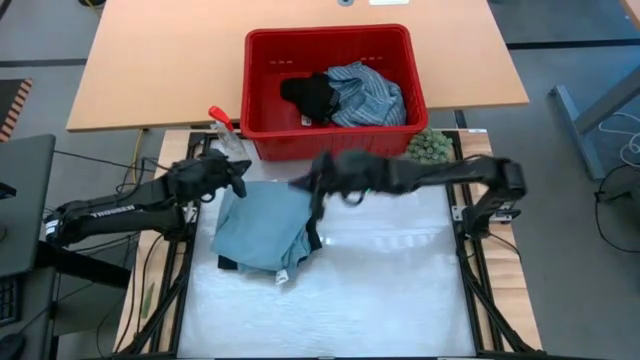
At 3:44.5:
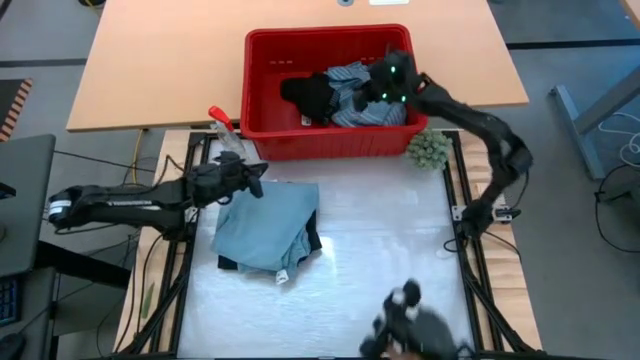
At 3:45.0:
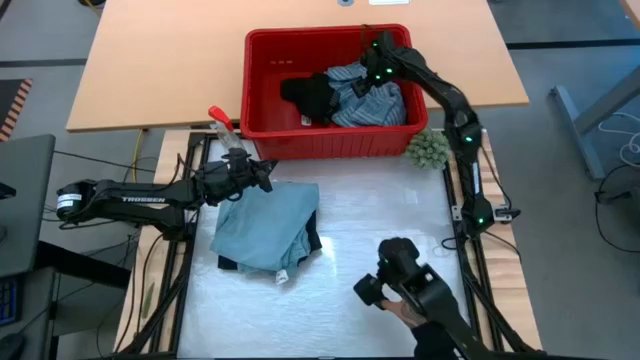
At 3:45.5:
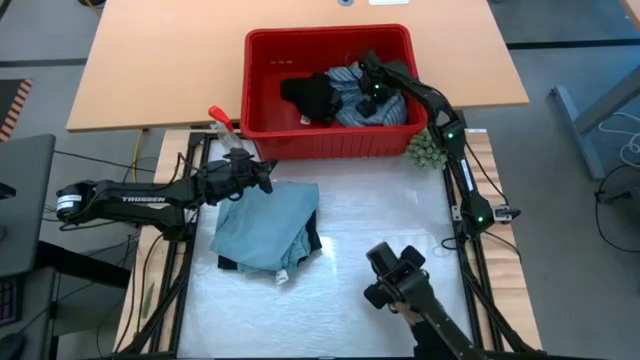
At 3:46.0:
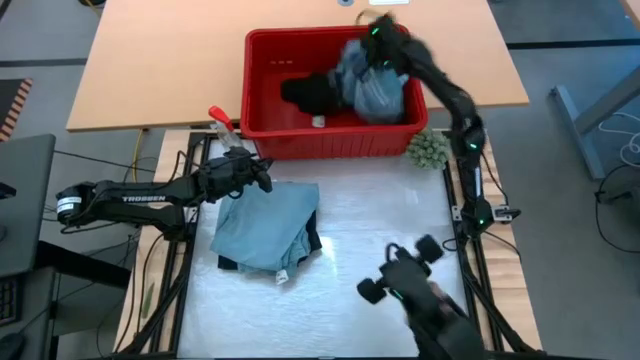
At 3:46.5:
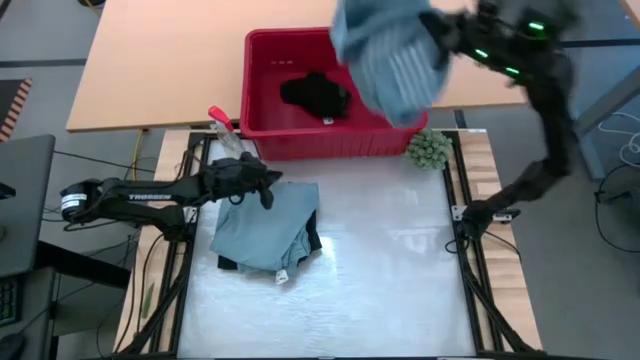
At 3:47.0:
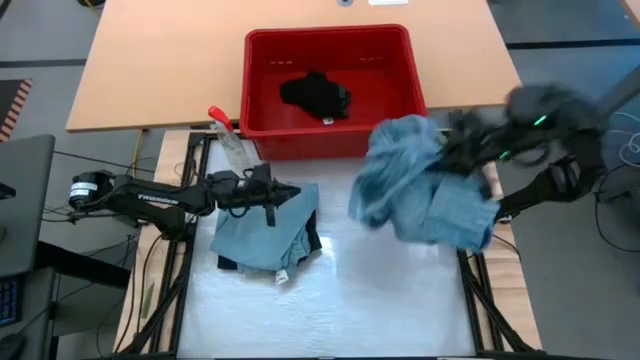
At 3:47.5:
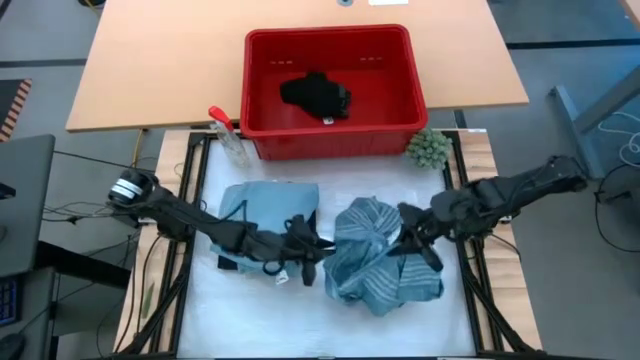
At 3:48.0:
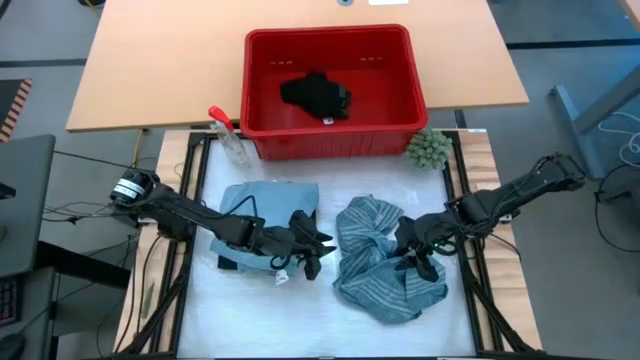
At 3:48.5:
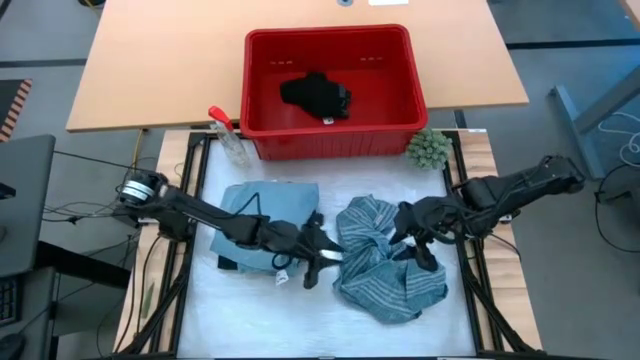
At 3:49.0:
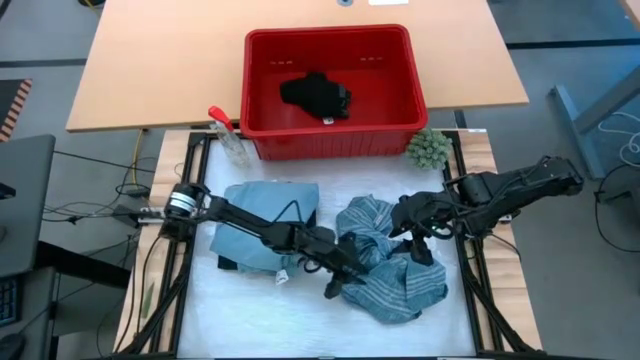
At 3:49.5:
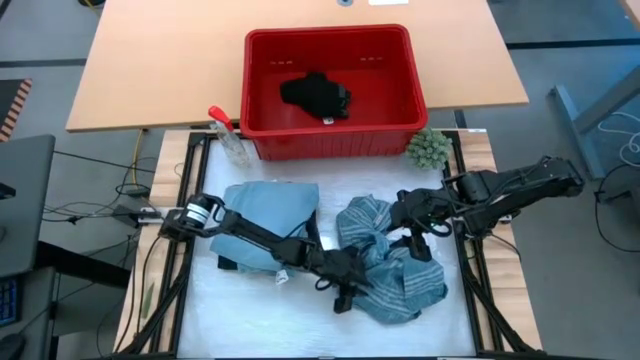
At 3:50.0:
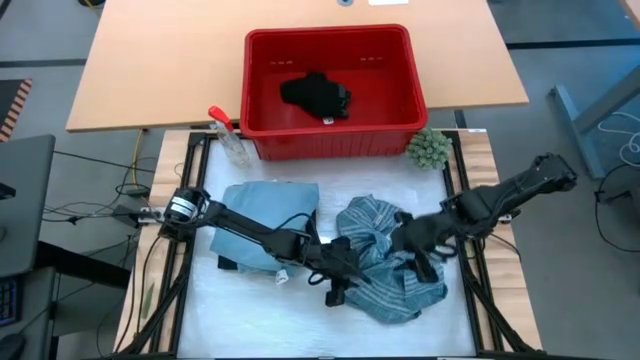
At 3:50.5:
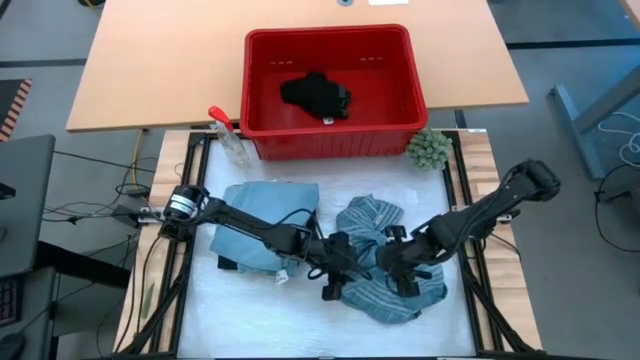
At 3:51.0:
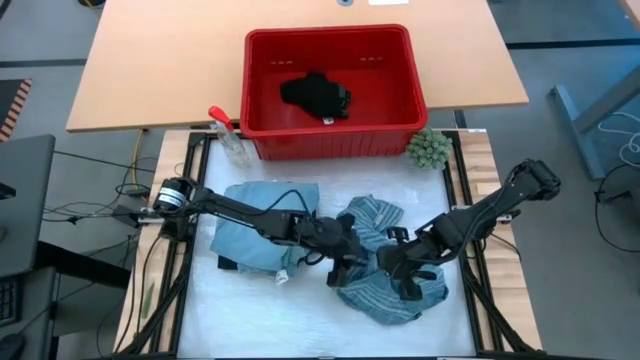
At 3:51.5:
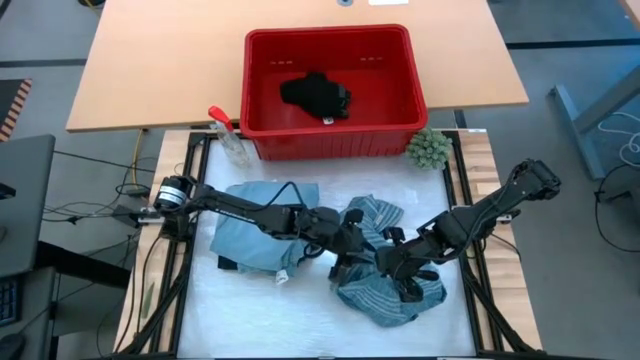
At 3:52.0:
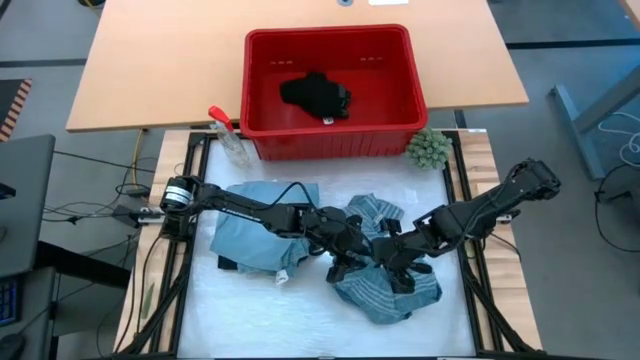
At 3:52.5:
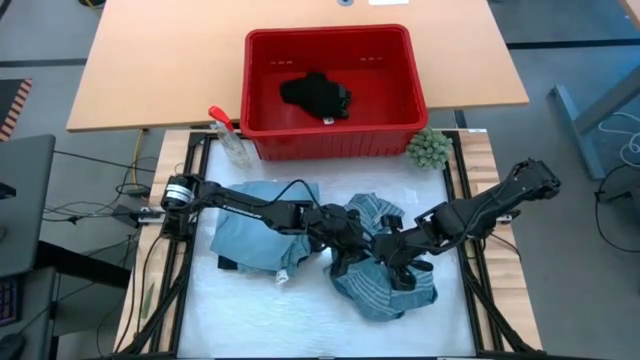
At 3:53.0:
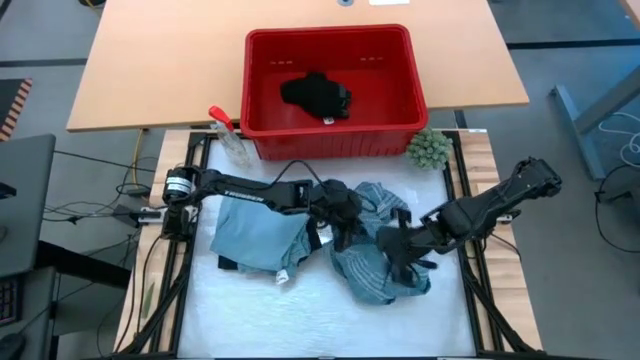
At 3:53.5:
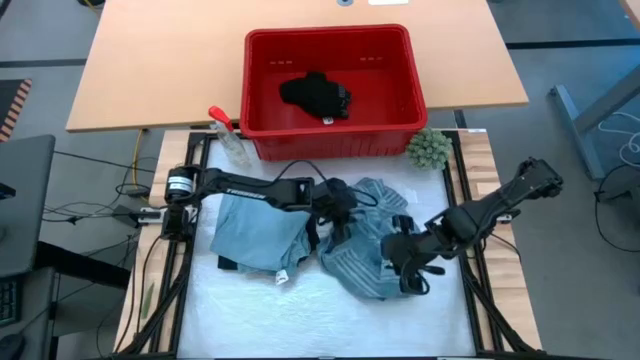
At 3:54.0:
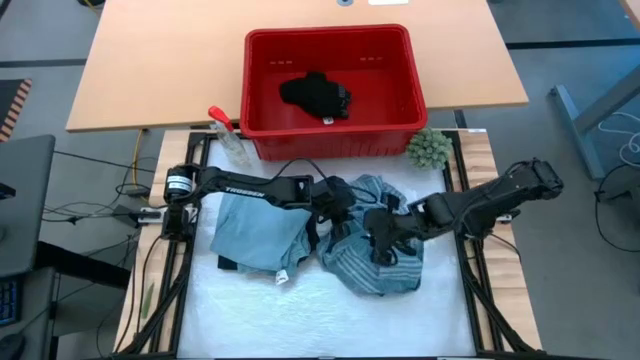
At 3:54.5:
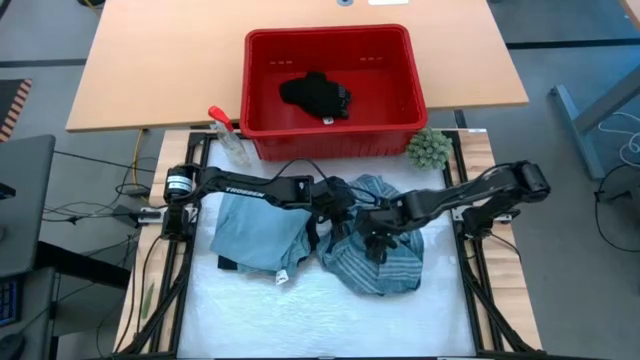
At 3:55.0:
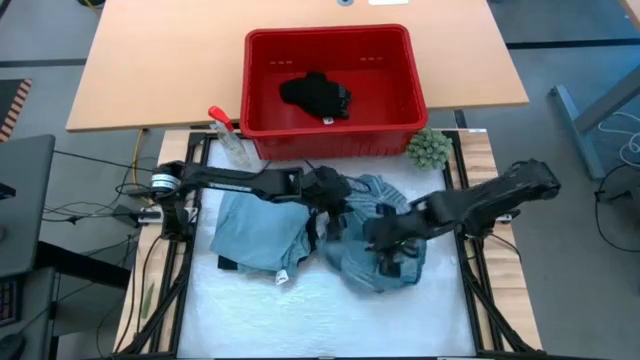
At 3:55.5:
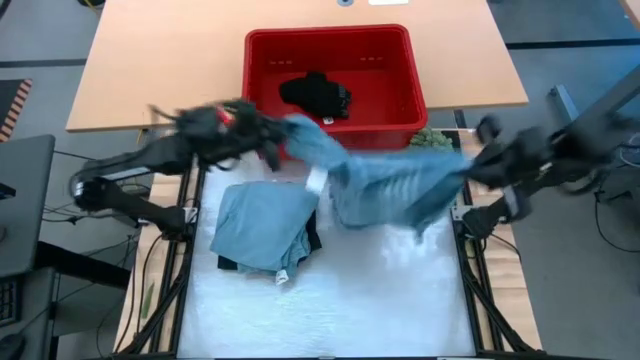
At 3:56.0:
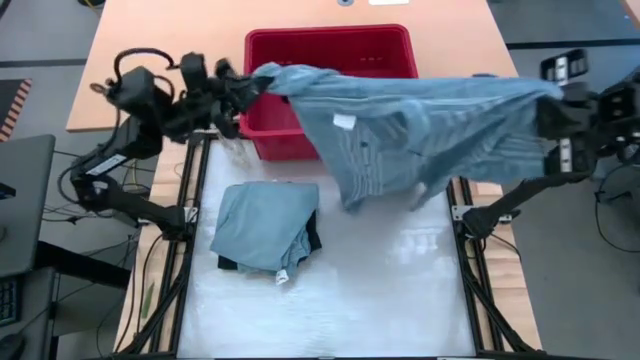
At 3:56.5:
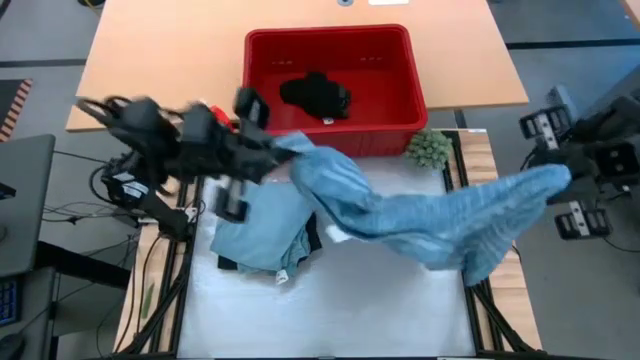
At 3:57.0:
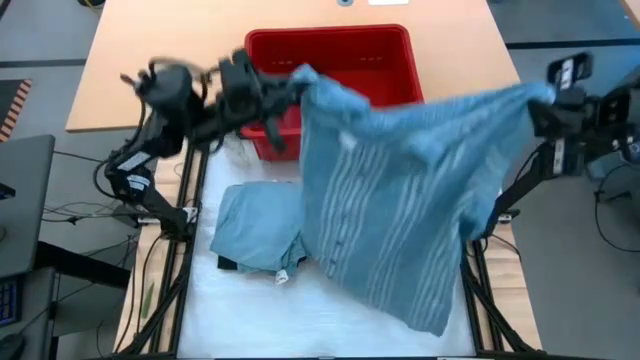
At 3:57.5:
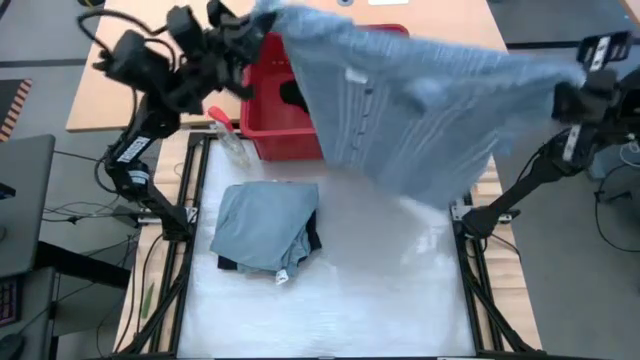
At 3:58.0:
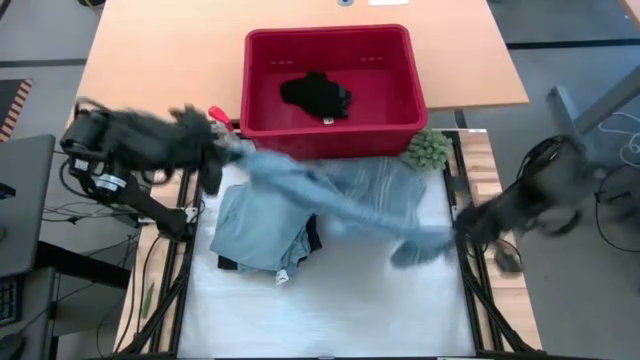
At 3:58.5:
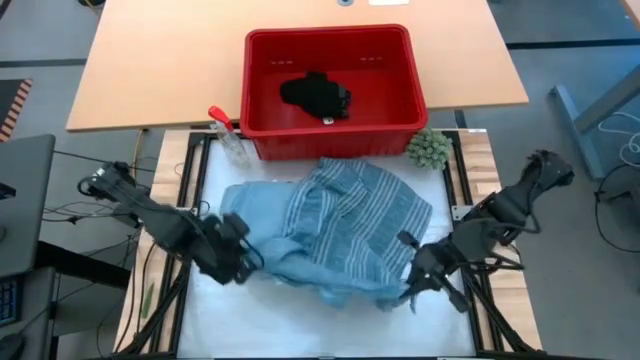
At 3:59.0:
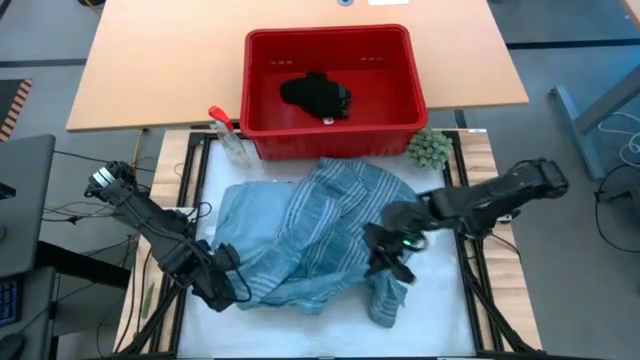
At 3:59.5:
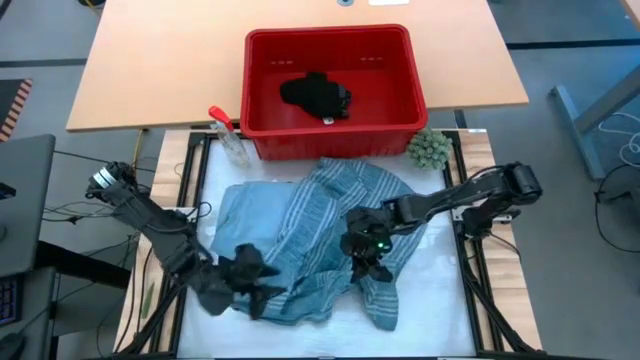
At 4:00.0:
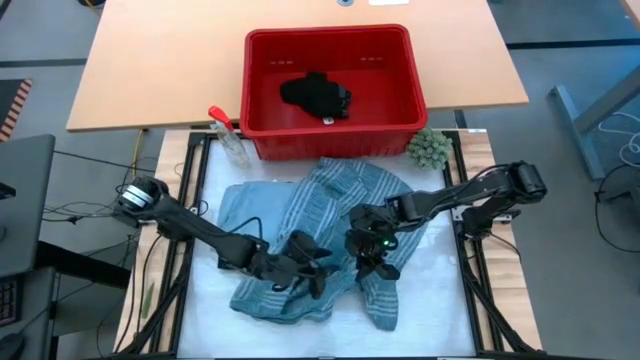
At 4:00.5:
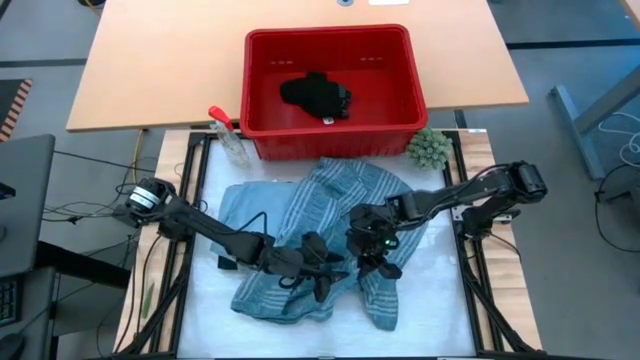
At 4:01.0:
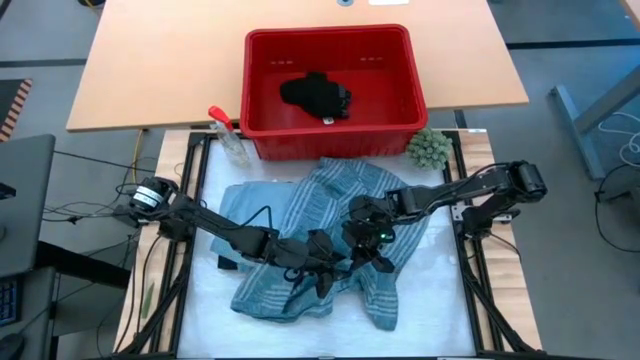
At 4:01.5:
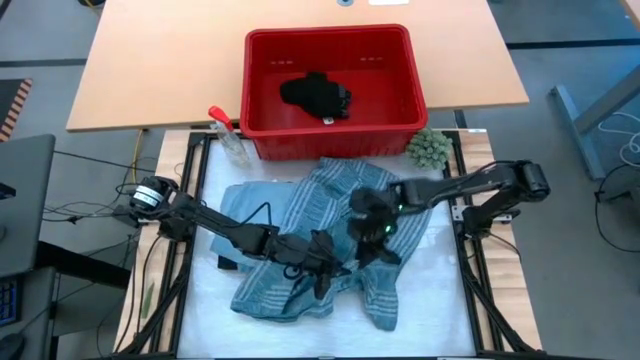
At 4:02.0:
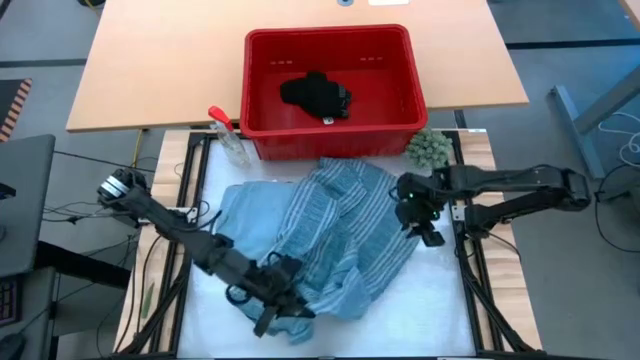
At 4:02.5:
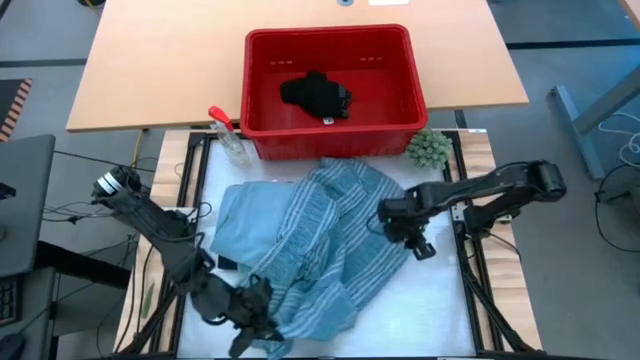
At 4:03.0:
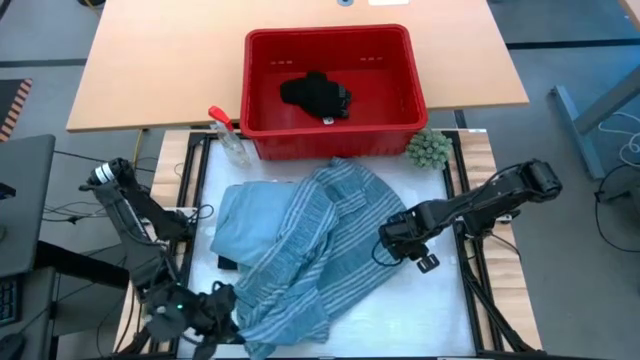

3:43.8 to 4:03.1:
Task: Fold Laundry from Bin
Fold the light blue polo shirt

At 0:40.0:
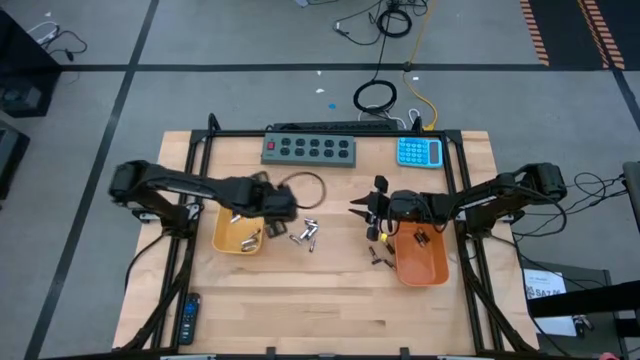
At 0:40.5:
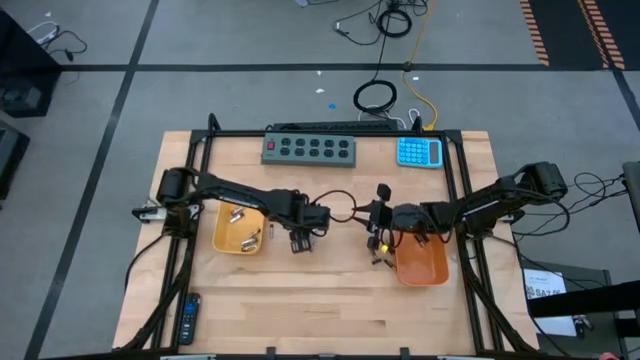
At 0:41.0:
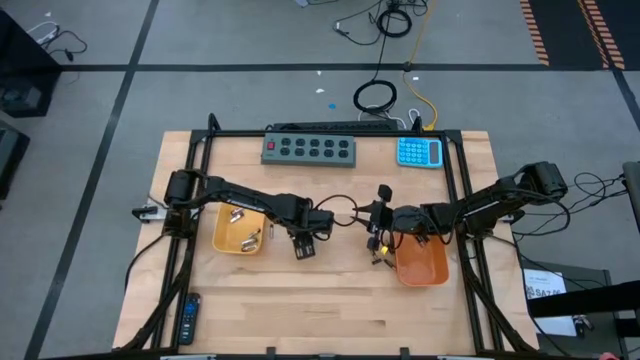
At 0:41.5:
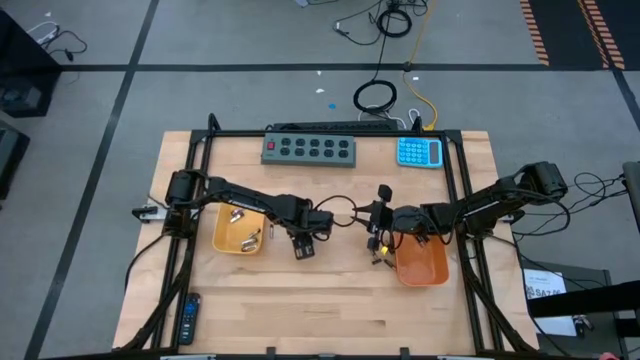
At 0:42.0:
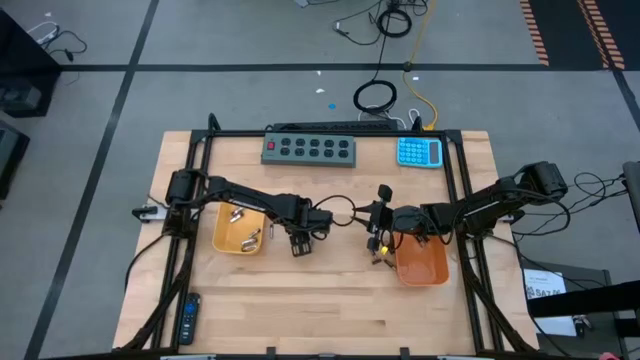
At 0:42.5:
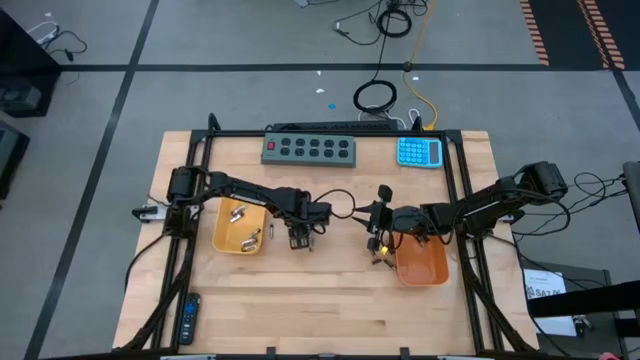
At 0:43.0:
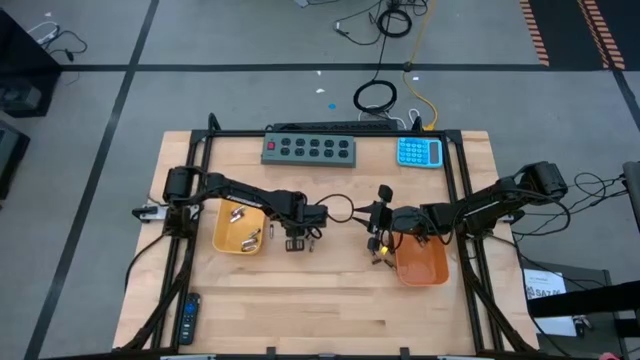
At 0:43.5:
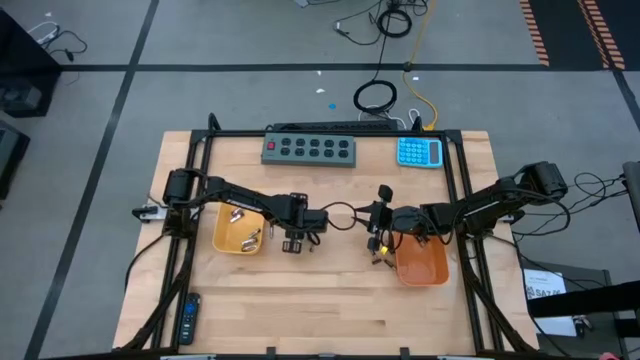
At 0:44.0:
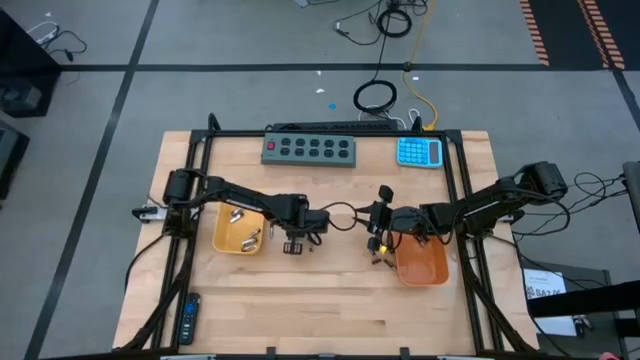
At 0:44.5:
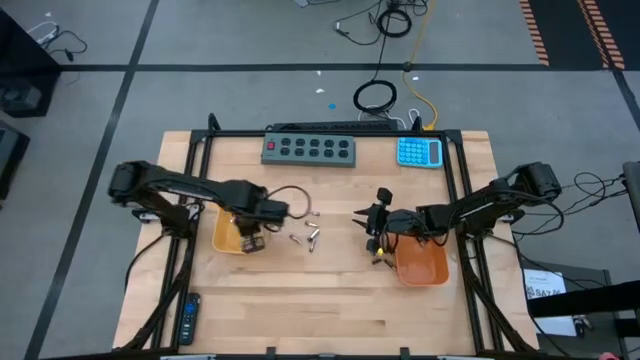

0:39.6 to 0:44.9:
Task: Sort batteries
Put the silver battery into the yellow bin
